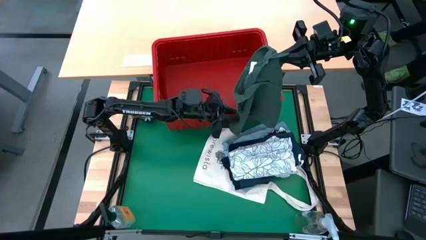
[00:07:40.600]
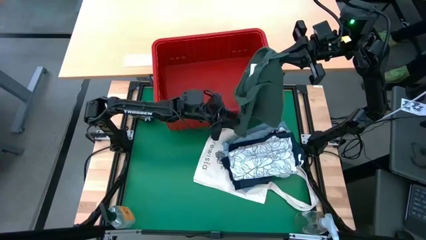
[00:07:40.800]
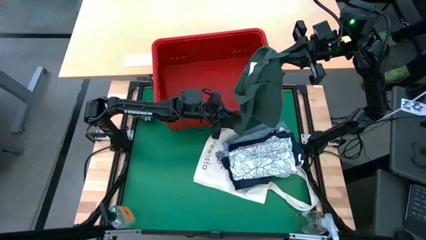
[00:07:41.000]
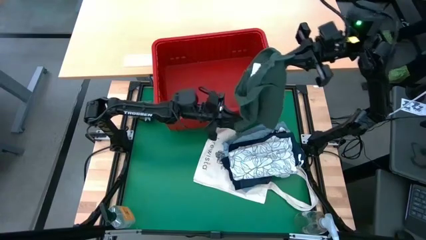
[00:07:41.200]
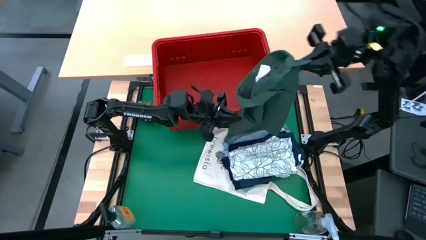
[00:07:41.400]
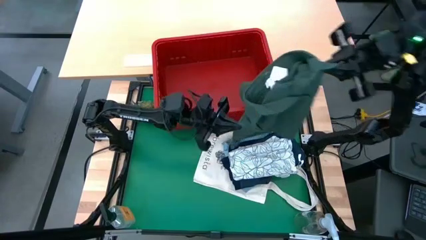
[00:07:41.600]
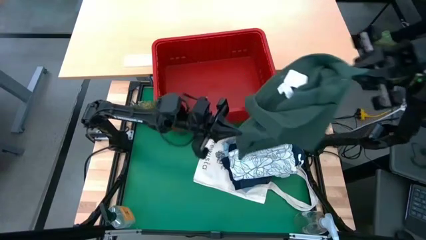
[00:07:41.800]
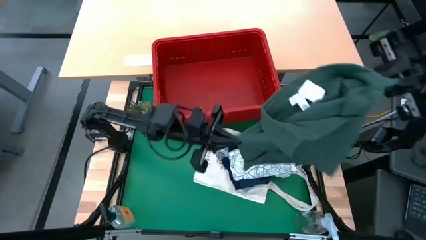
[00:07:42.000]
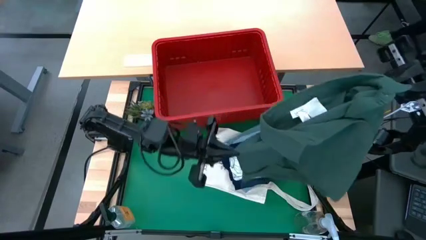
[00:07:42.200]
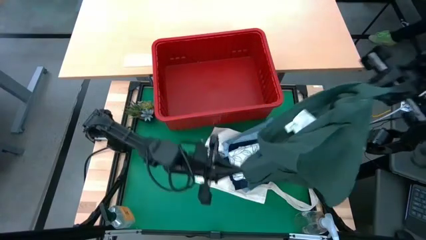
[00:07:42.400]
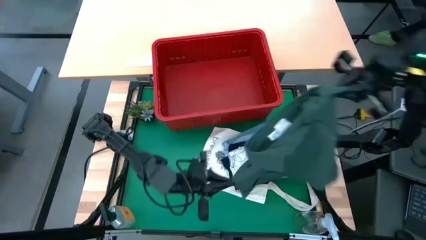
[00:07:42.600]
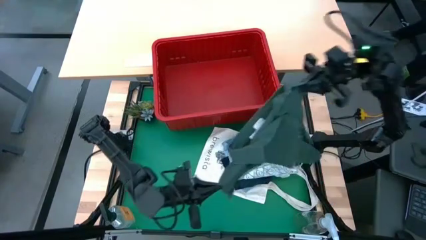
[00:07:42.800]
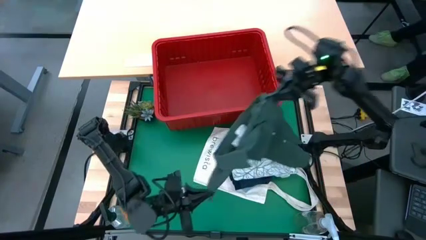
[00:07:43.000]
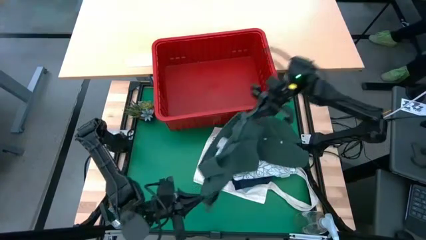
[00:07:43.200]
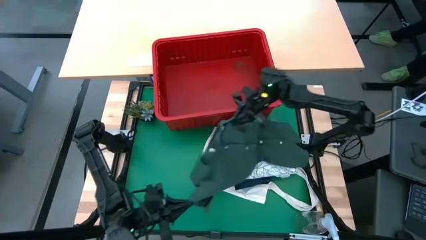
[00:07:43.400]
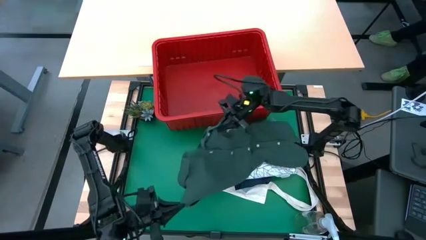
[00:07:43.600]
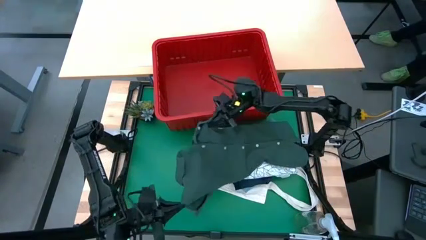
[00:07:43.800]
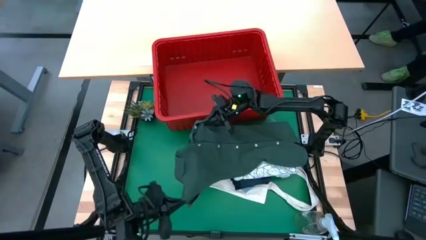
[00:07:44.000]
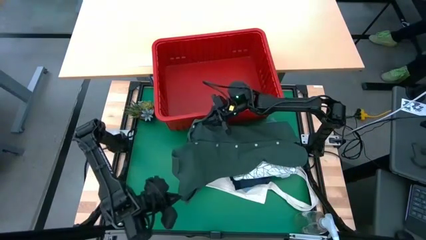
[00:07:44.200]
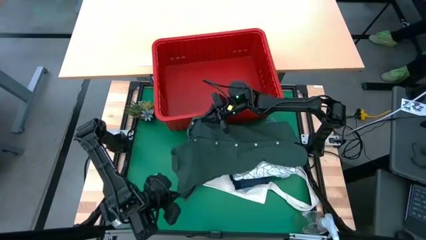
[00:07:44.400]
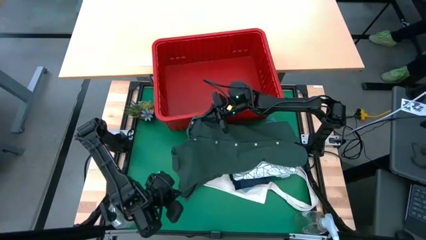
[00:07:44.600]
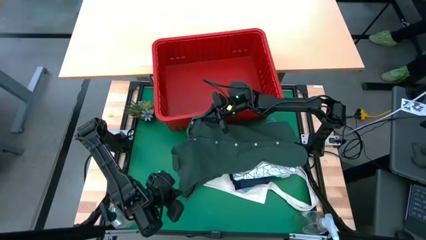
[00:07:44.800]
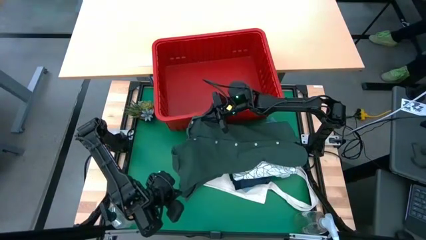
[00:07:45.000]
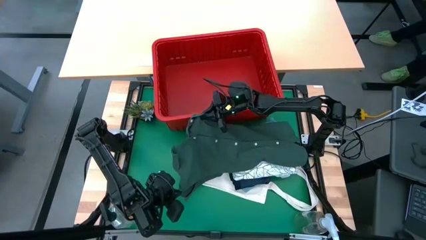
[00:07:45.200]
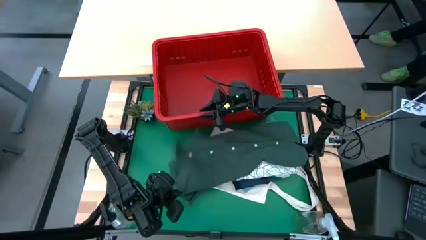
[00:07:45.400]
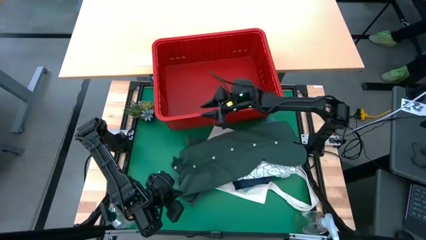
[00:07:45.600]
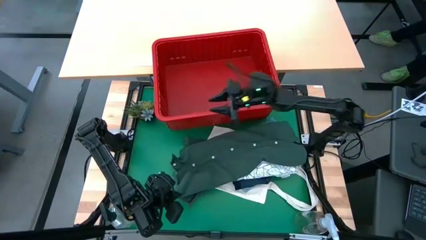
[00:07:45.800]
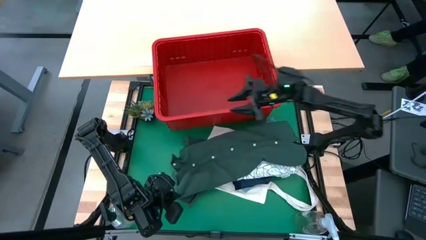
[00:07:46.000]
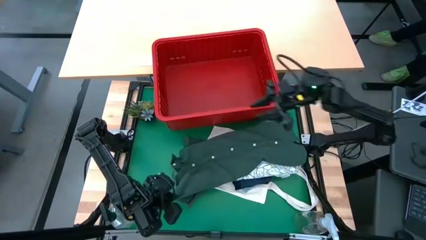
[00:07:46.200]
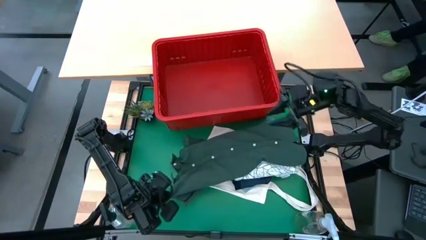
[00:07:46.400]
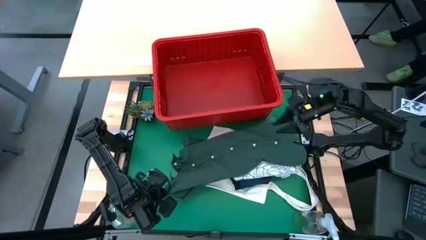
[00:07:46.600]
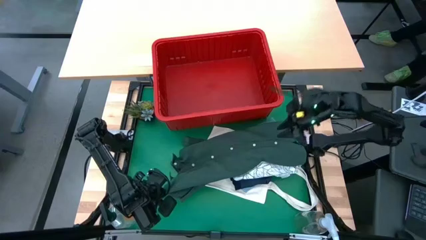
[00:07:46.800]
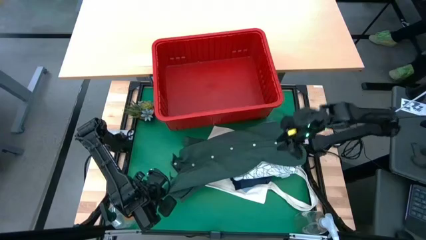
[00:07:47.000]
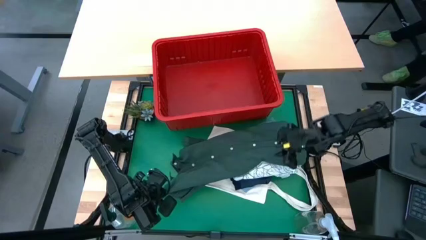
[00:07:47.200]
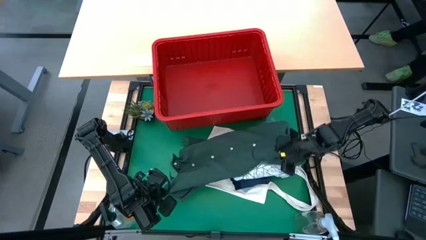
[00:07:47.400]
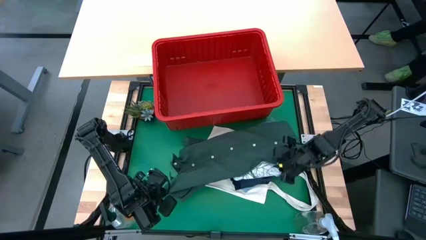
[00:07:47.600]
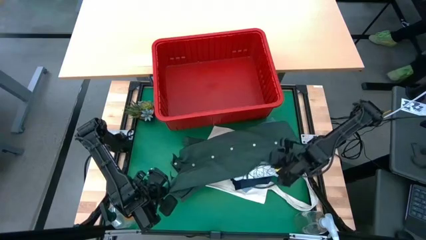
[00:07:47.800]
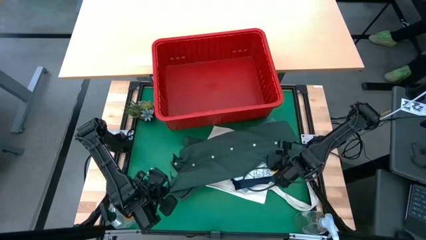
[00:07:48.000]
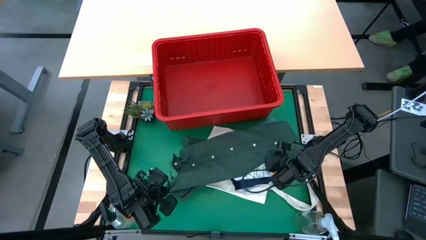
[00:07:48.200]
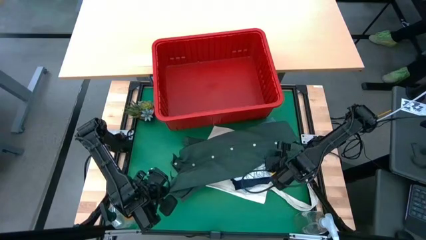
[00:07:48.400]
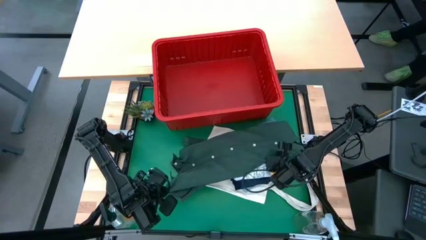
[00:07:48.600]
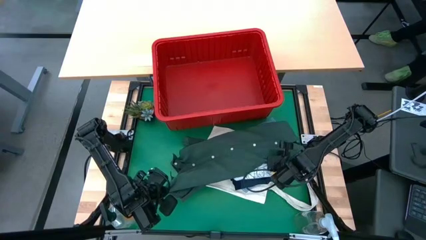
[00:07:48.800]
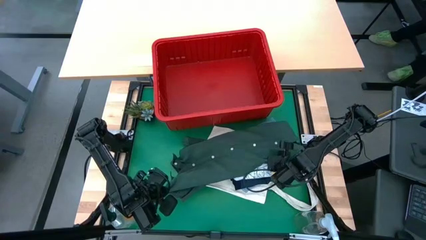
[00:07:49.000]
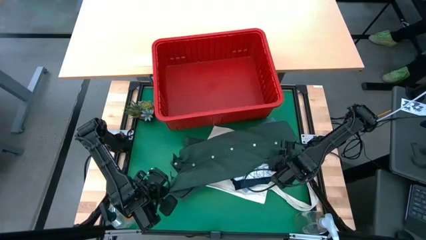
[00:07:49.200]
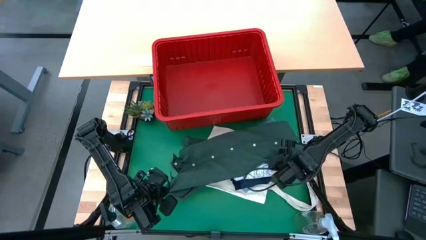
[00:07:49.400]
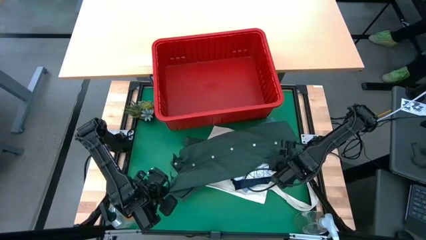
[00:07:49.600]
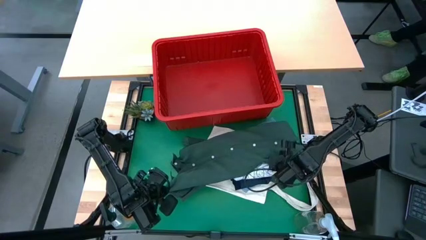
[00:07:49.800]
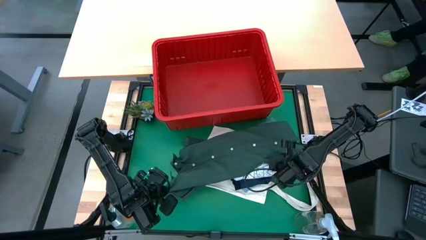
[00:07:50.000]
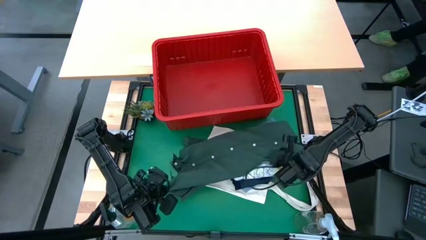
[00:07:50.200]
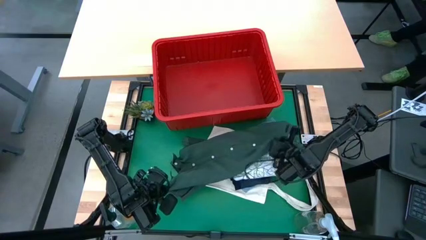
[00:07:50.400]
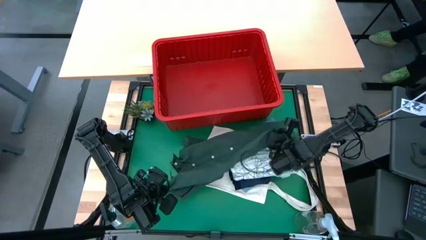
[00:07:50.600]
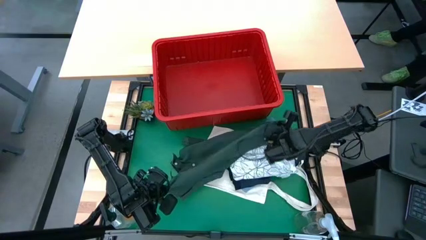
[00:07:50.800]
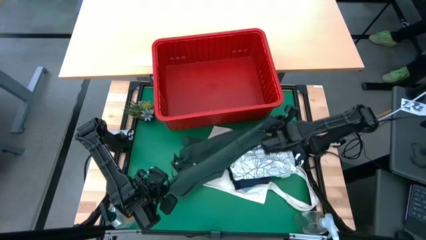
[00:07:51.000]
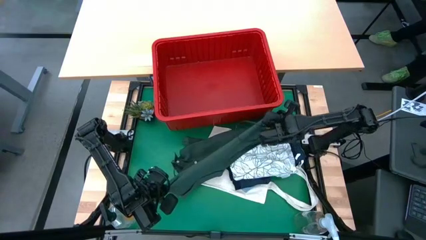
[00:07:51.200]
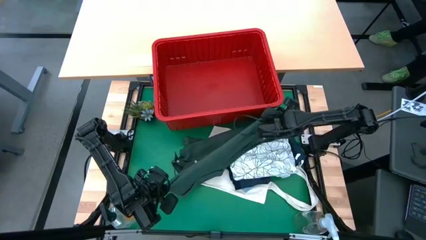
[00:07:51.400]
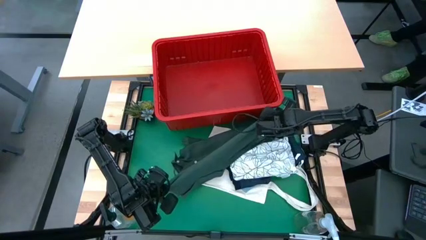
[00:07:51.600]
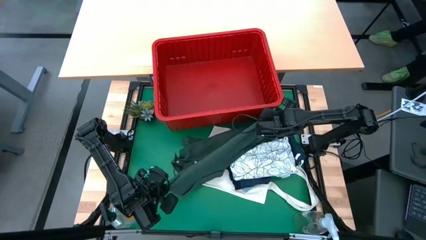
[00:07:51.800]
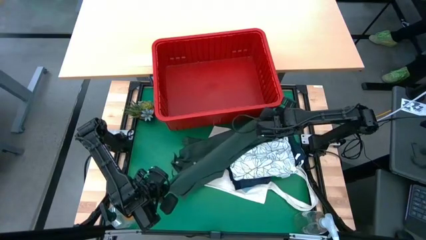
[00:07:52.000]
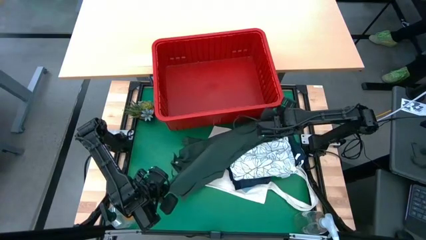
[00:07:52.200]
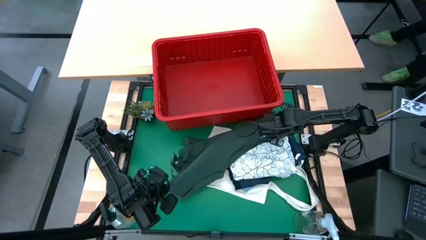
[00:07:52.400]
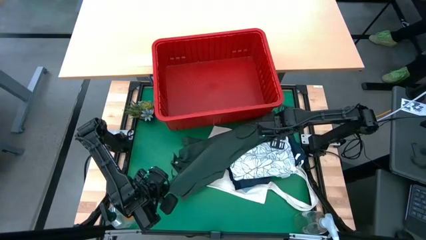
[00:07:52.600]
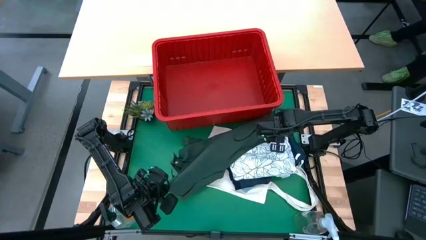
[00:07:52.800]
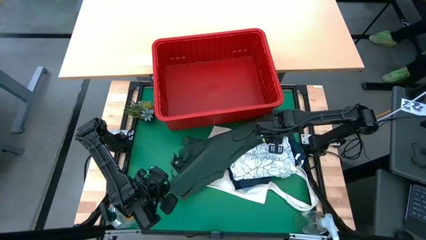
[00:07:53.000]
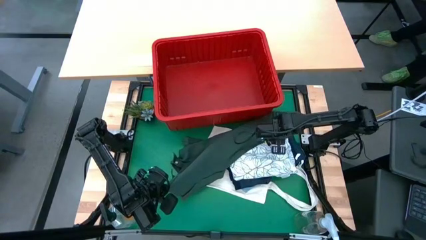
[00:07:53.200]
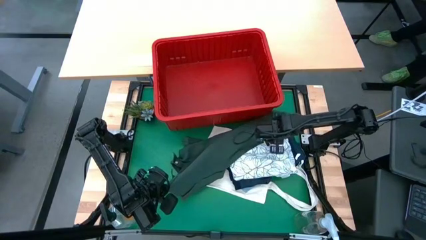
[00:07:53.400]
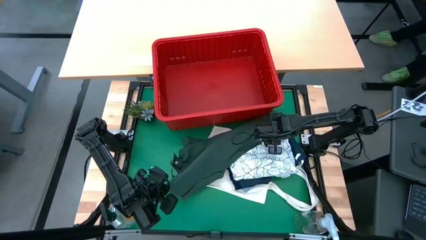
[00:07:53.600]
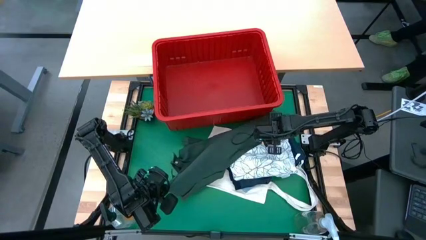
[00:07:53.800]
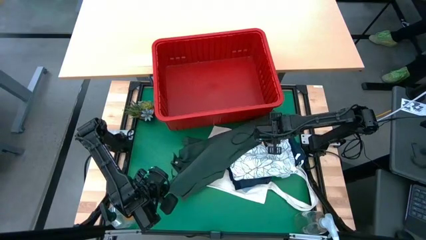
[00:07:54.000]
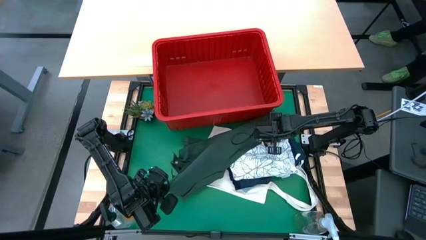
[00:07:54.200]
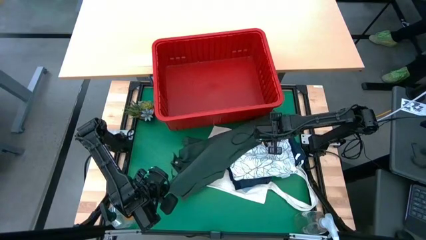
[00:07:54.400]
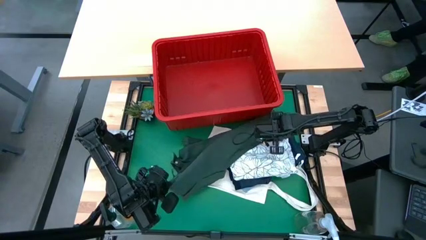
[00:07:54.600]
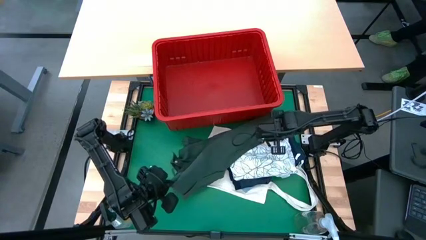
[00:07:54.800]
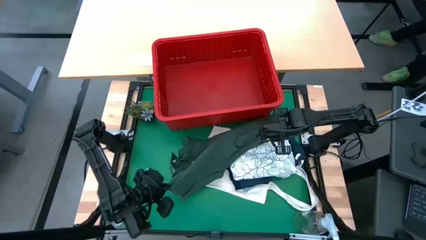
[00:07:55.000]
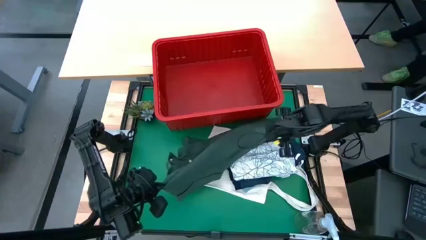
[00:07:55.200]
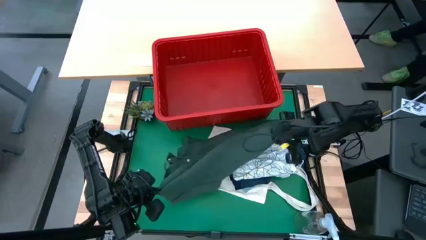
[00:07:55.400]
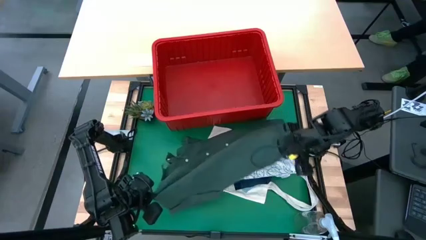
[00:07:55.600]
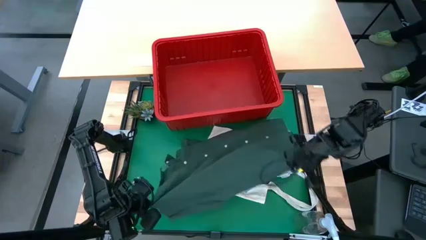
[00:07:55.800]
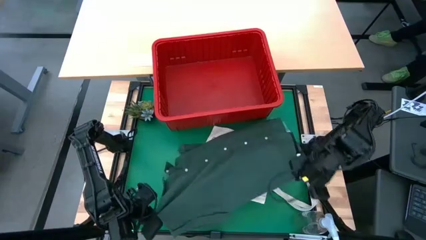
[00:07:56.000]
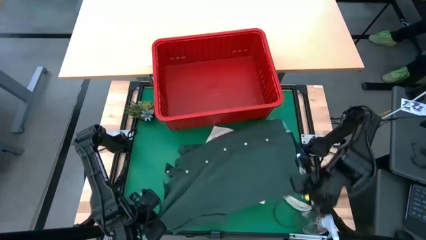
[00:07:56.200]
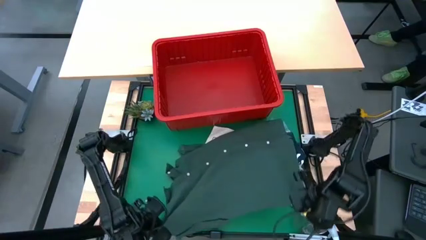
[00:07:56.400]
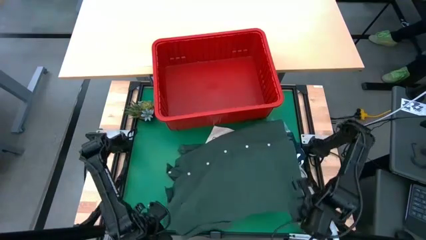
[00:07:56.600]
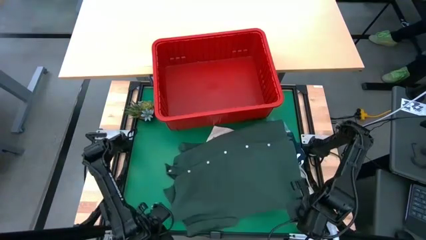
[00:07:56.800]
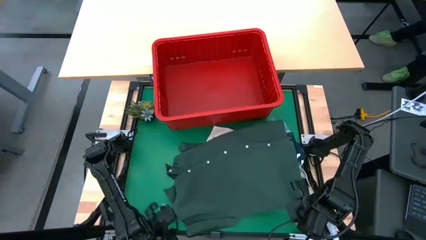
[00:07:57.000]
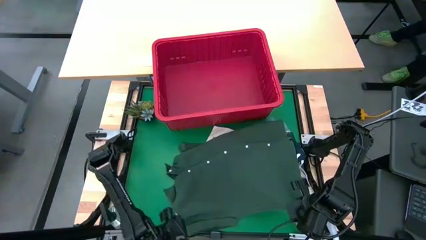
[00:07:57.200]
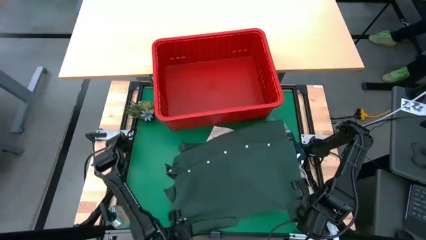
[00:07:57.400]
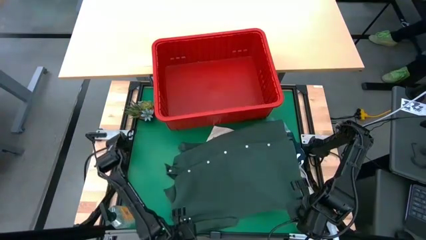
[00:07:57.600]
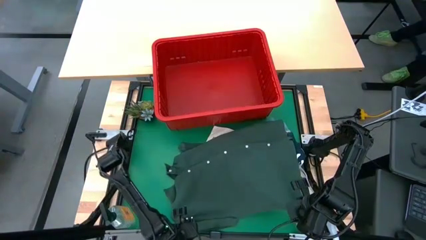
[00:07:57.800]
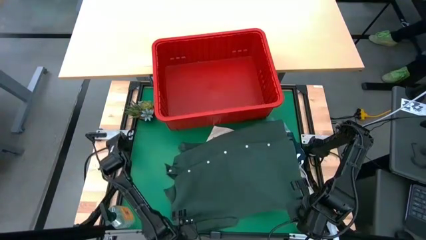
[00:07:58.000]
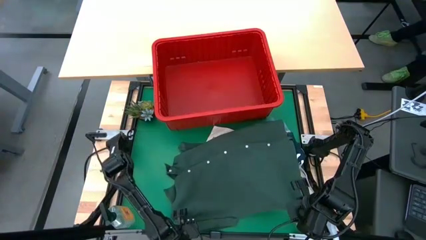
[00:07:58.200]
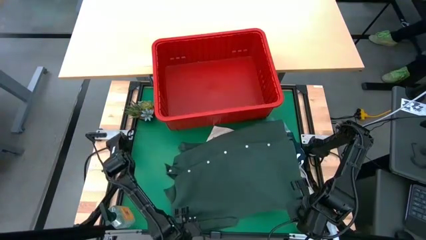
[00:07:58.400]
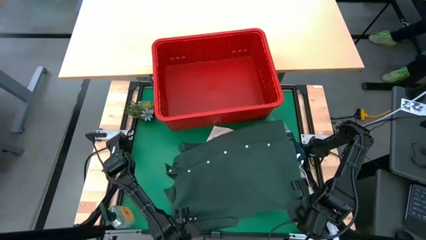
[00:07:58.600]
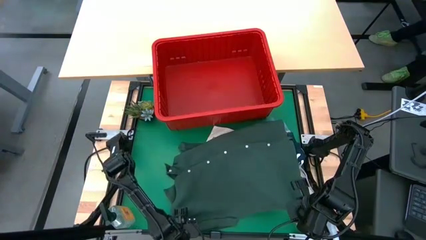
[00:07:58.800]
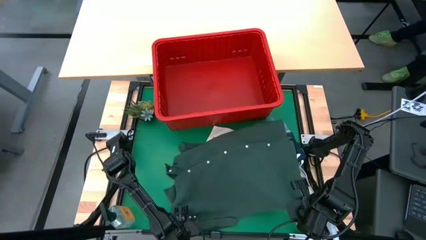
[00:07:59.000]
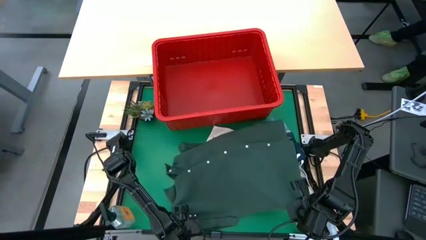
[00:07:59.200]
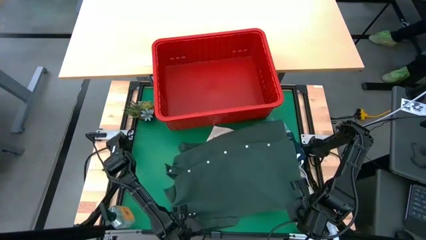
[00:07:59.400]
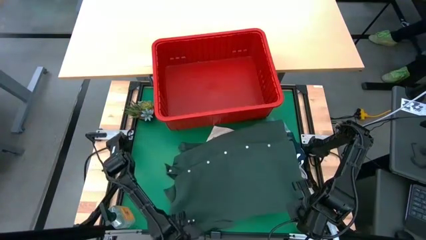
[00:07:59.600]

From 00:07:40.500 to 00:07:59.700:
Task: Fold laundry
Fold the patterned white shirt
